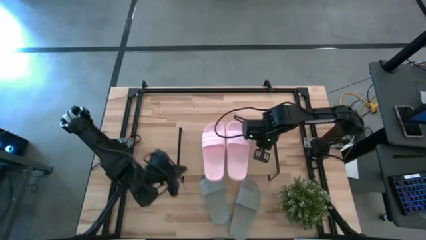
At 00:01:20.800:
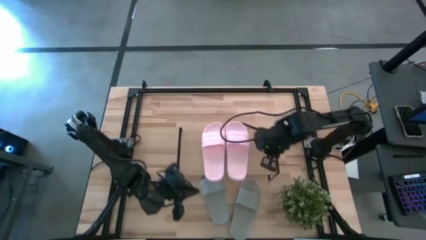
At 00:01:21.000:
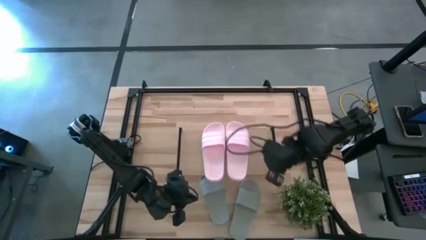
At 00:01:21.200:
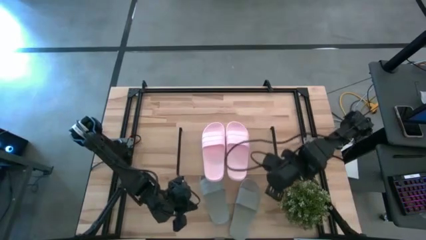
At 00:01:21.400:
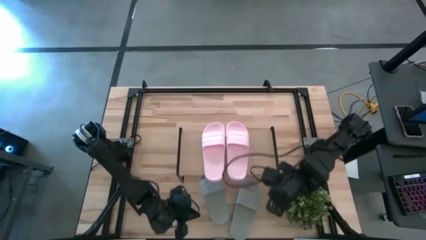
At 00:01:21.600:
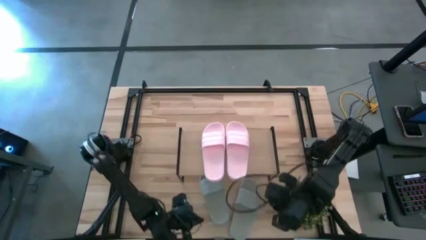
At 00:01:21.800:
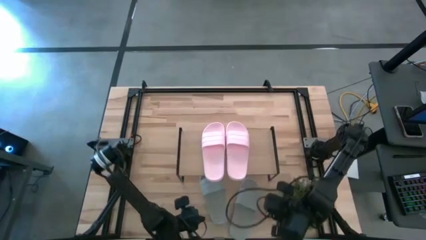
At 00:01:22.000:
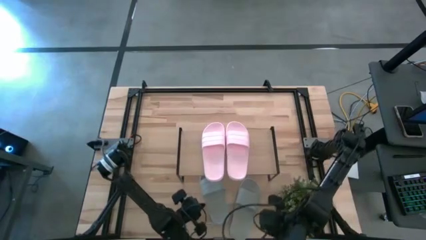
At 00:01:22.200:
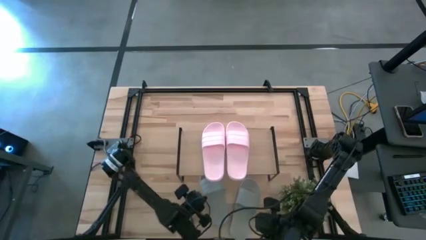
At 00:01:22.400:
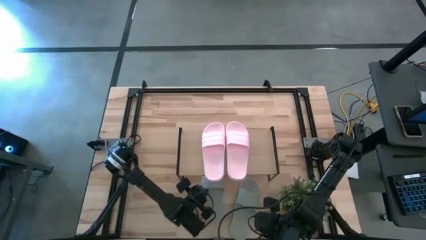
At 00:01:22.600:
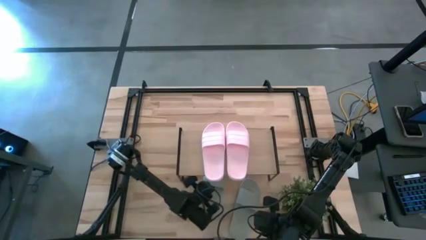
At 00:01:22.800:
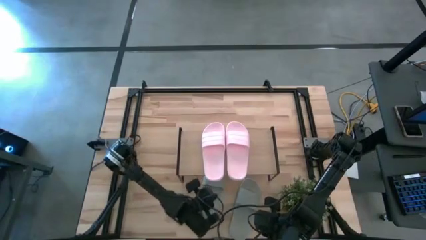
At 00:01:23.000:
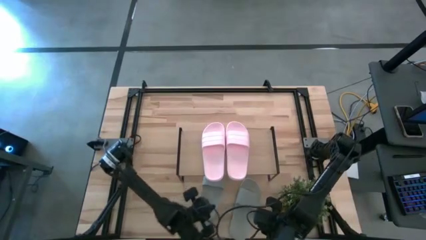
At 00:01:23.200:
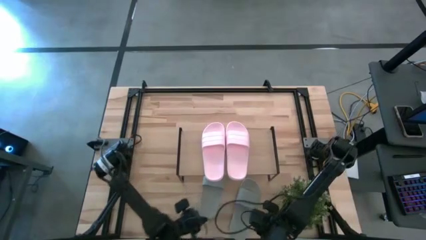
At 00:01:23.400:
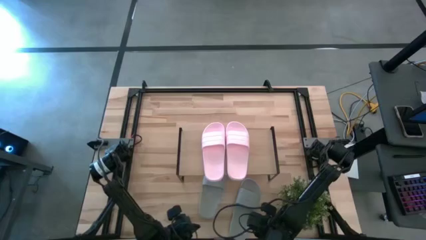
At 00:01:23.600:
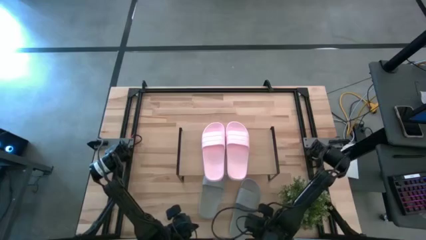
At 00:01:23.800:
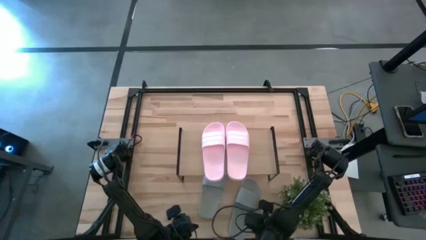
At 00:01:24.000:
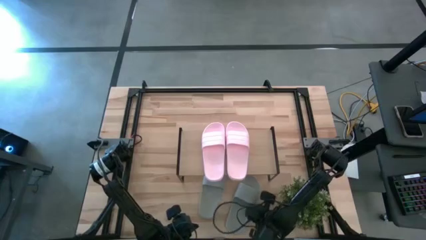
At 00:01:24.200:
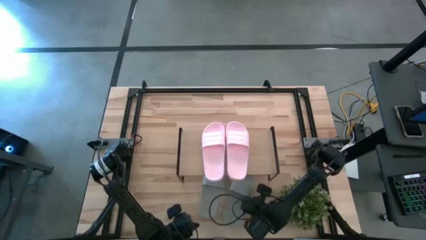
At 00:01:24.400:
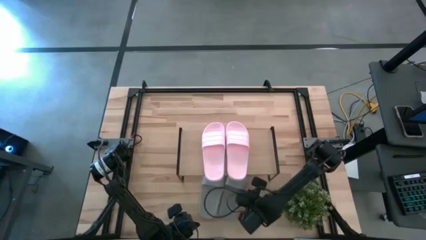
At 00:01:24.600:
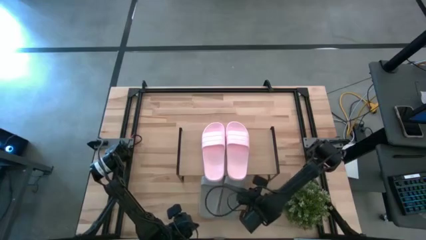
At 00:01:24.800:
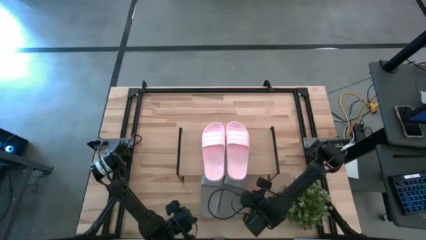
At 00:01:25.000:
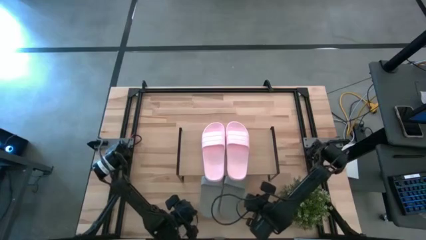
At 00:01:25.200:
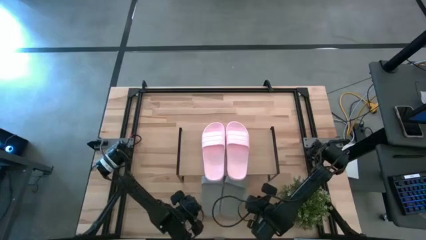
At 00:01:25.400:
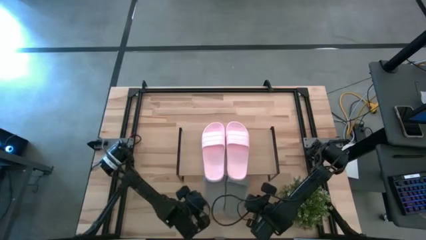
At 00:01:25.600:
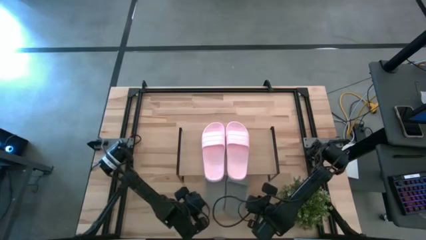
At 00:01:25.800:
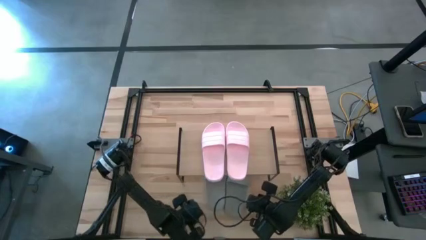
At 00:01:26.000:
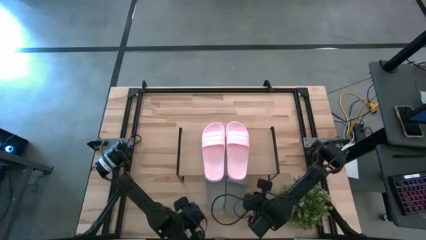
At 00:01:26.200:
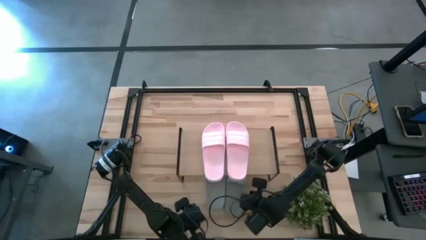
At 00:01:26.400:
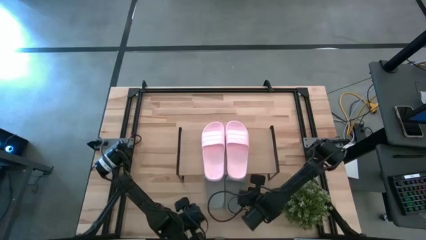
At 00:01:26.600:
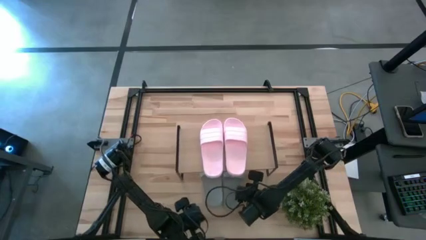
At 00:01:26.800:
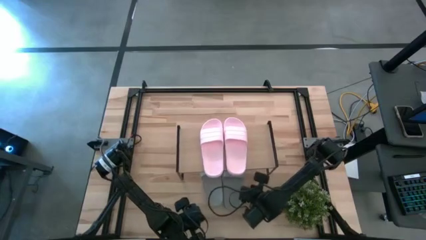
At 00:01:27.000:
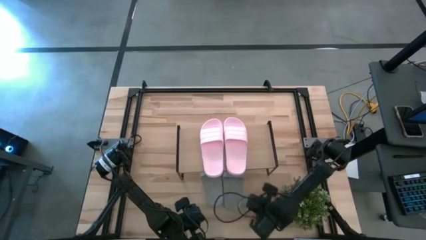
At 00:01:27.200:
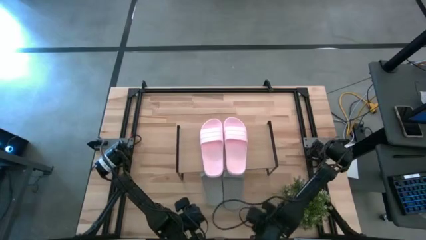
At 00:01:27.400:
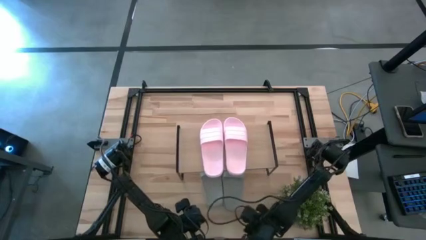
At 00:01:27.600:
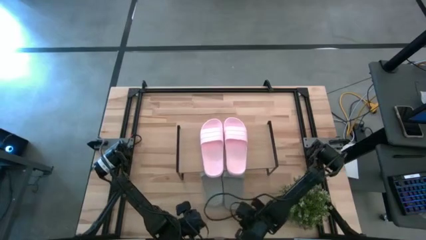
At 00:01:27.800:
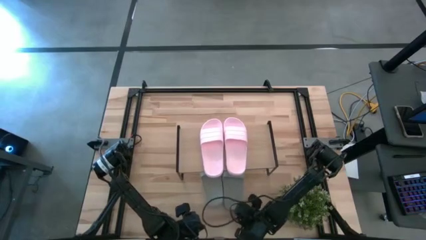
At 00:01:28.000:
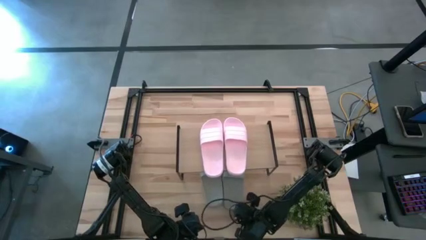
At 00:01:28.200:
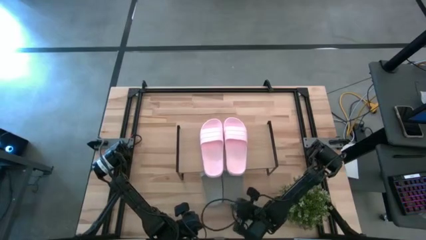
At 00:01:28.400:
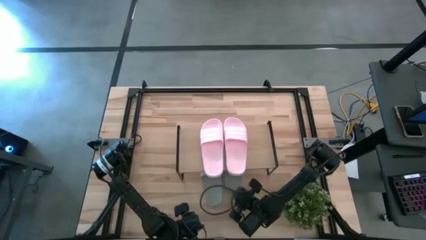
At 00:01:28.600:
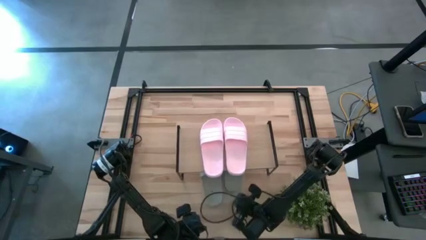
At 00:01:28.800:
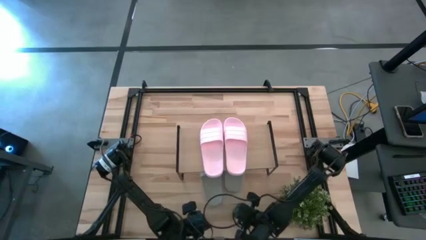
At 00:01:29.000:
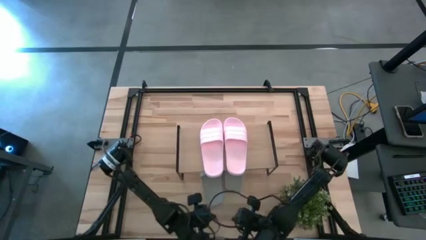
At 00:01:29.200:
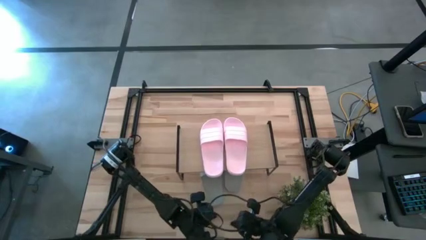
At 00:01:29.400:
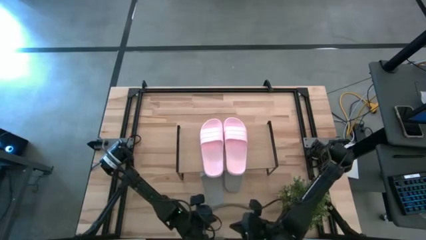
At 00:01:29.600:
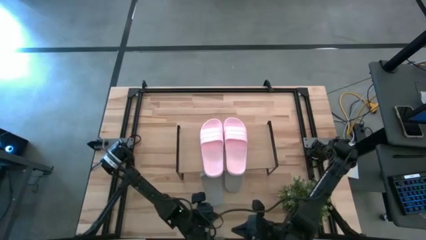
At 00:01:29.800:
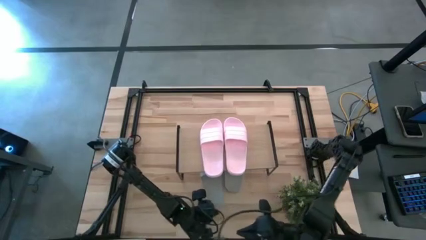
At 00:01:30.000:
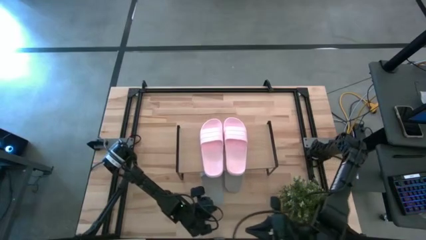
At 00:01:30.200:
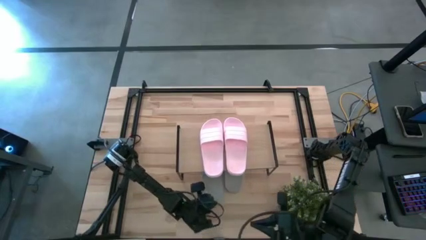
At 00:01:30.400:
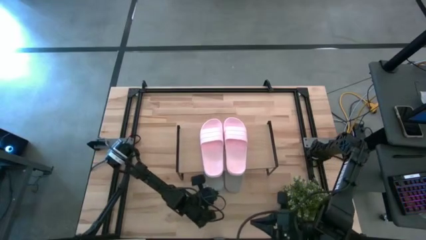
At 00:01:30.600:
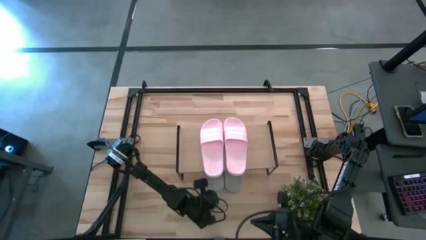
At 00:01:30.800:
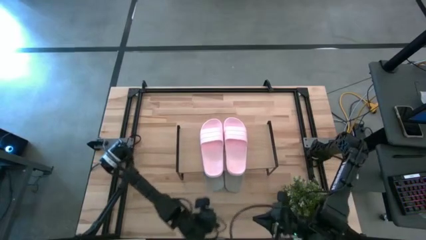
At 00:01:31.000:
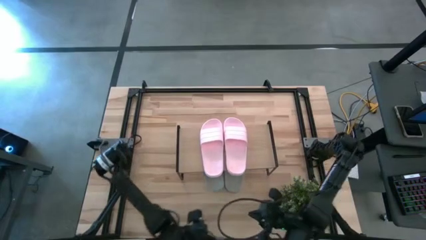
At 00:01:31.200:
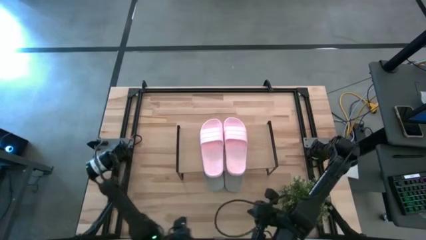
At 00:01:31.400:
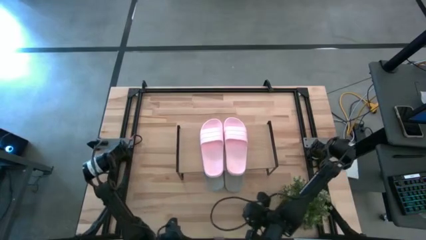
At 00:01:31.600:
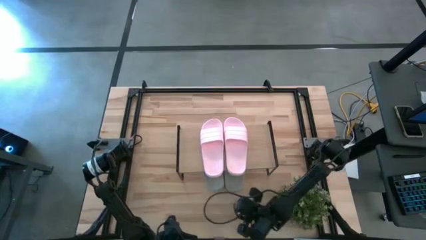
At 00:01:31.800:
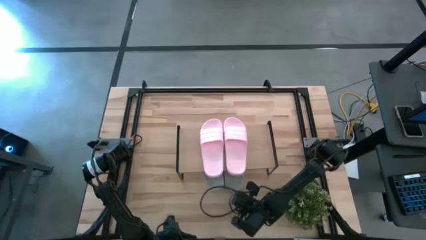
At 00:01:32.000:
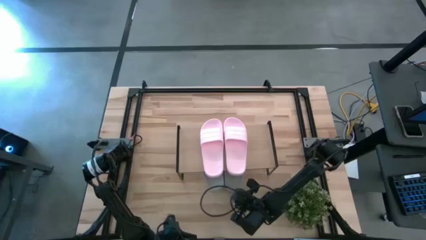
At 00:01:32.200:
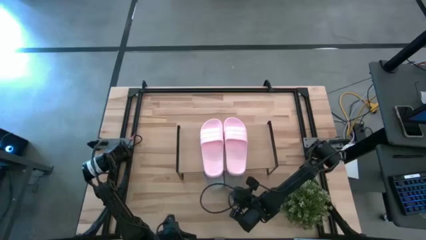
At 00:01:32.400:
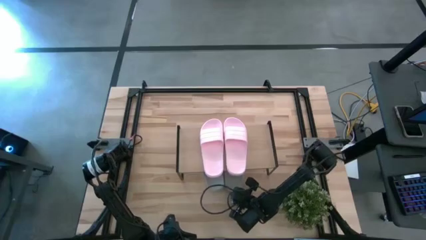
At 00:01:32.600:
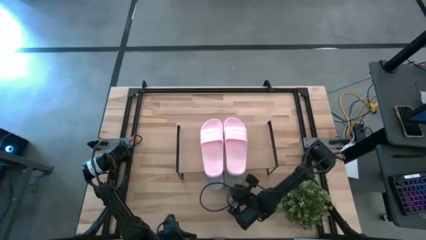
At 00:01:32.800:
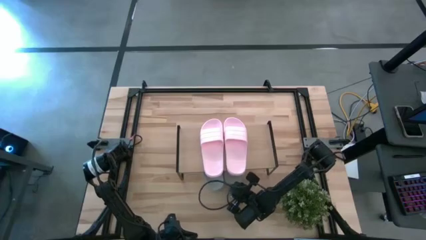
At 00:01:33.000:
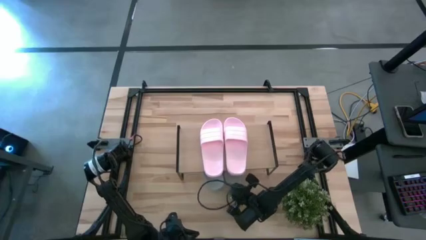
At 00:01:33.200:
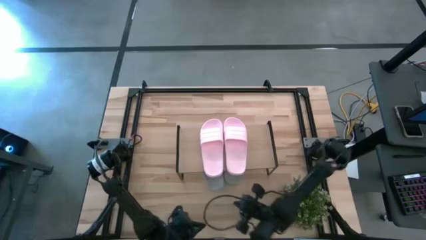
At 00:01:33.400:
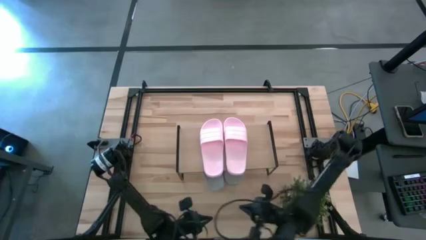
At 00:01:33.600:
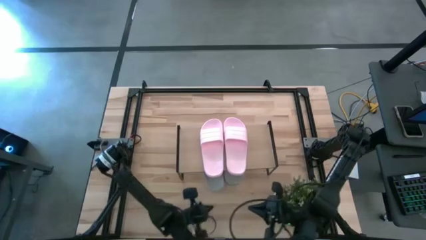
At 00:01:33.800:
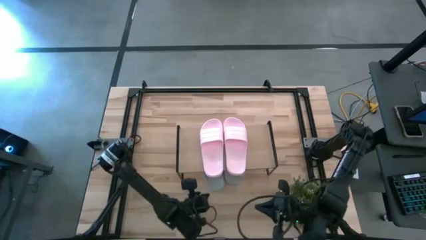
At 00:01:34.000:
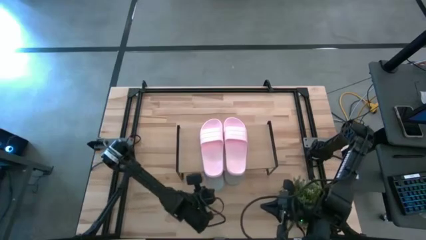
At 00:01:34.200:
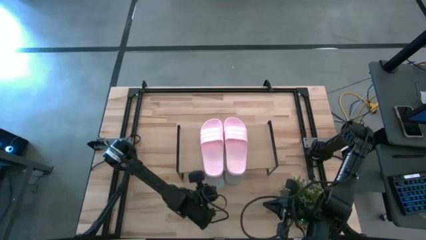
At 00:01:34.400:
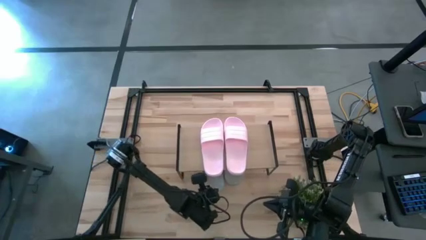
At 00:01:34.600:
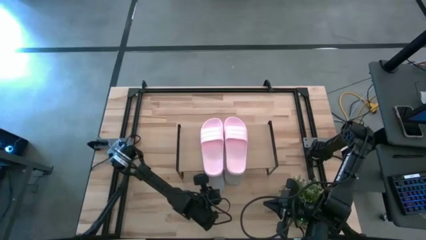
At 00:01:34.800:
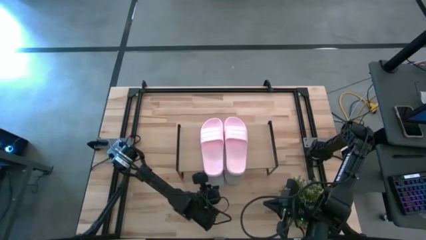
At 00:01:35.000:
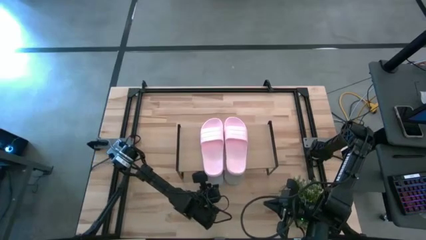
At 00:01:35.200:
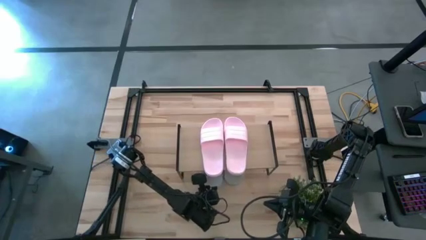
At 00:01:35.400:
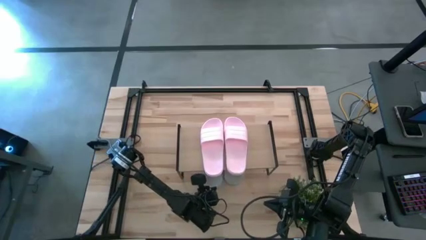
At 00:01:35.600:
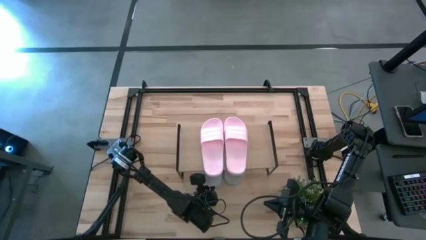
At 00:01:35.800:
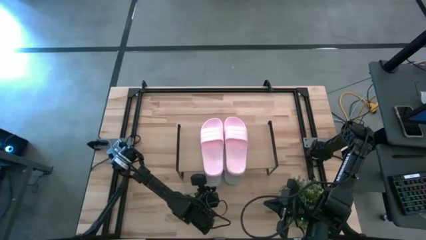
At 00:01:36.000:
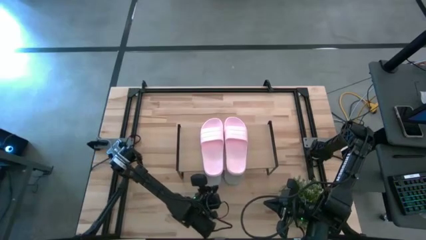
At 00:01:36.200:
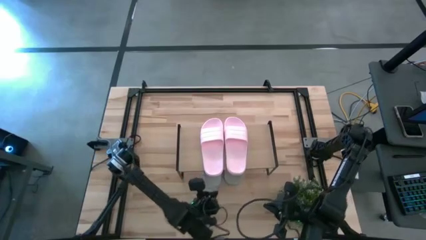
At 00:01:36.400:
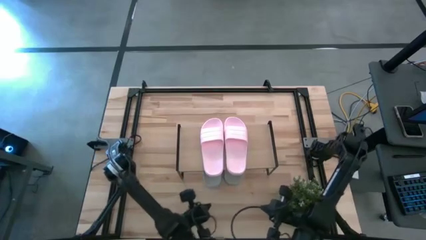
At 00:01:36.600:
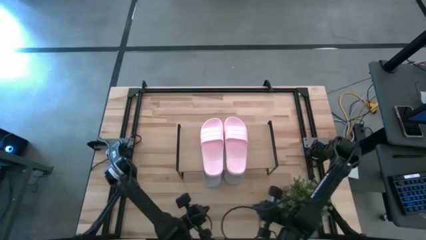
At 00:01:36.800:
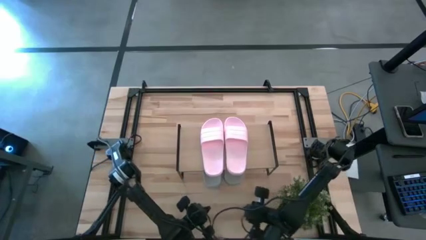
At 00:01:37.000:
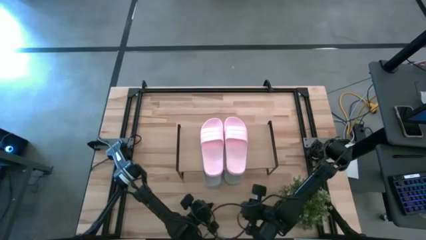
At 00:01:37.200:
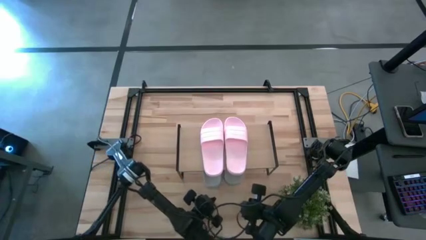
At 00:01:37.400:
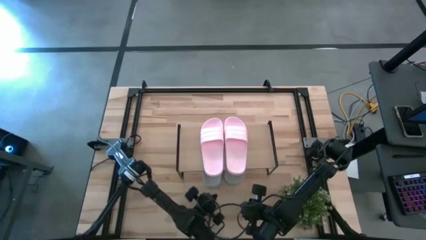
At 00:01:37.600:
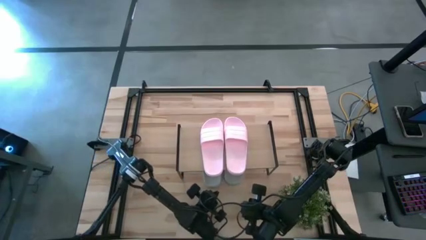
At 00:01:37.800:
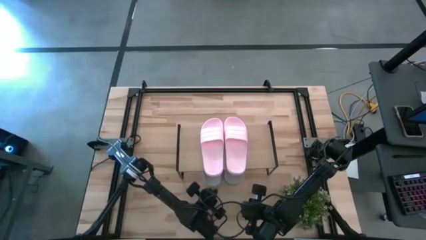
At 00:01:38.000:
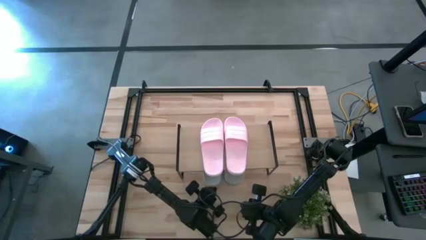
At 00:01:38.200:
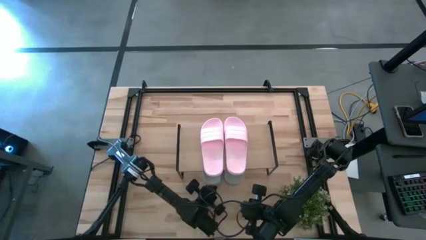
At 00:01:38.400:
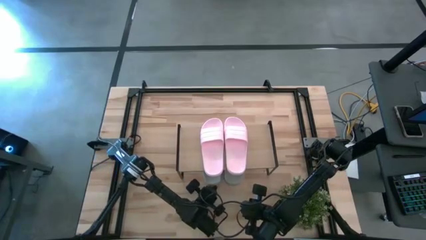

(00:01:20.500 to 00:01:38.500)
Task: Pick and place slides into the shelf
Adjust the gray slides under the shelf
